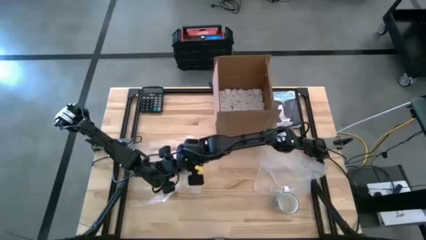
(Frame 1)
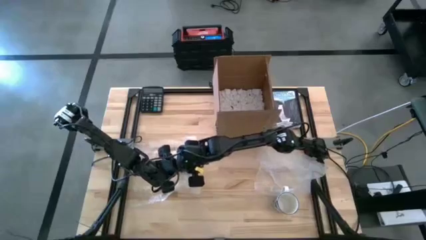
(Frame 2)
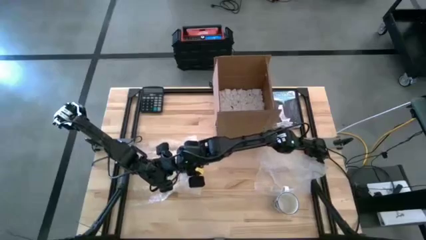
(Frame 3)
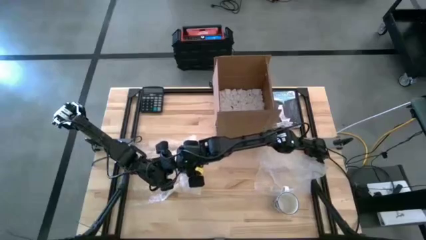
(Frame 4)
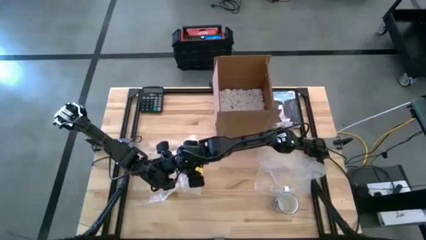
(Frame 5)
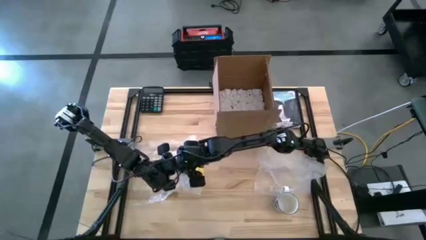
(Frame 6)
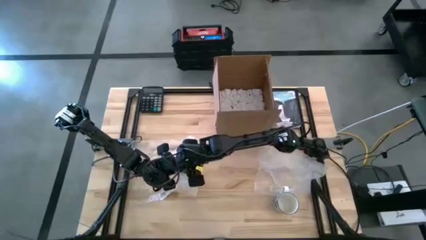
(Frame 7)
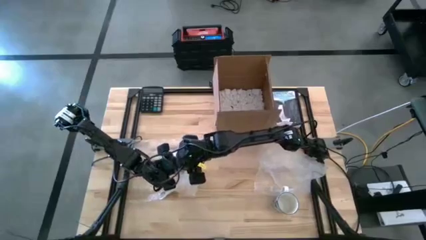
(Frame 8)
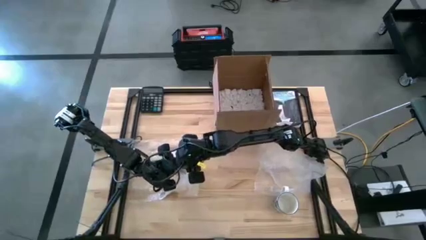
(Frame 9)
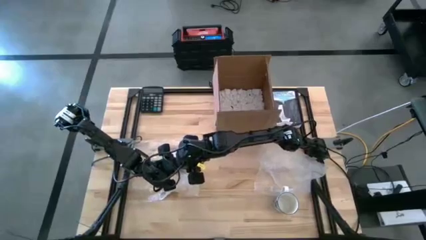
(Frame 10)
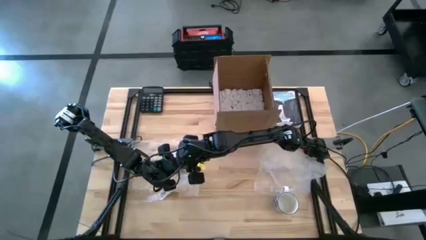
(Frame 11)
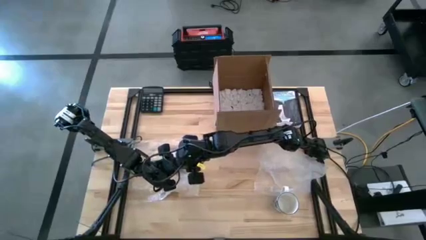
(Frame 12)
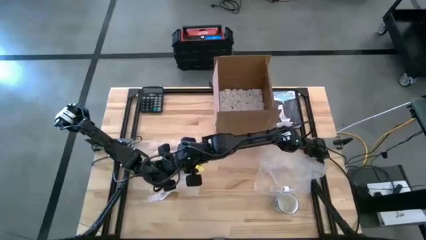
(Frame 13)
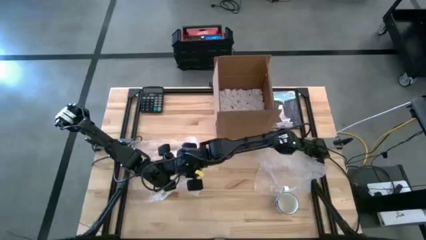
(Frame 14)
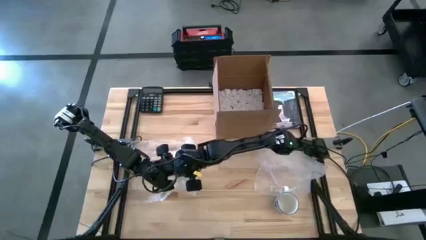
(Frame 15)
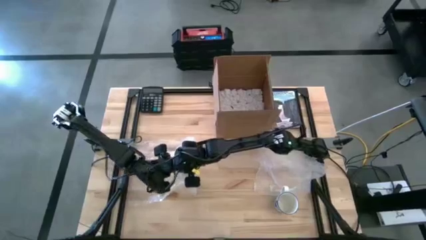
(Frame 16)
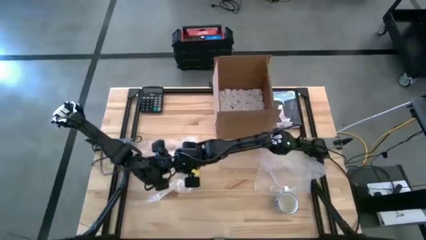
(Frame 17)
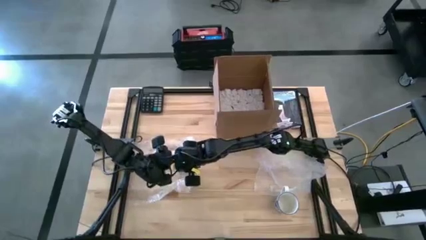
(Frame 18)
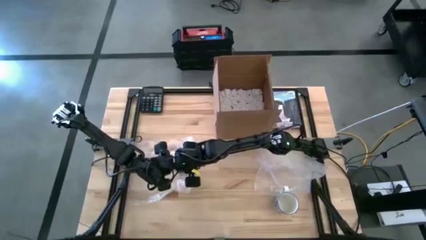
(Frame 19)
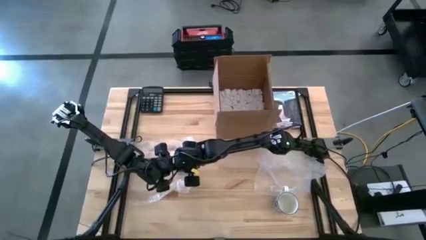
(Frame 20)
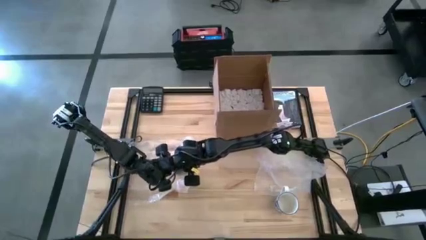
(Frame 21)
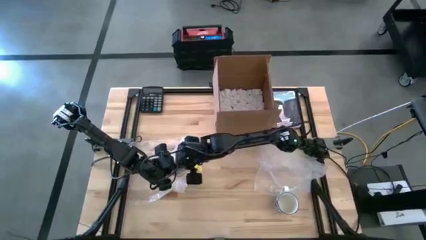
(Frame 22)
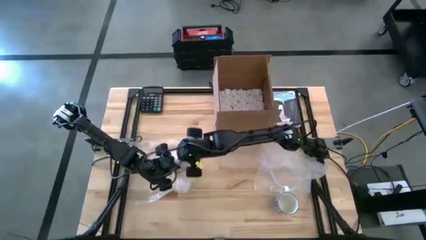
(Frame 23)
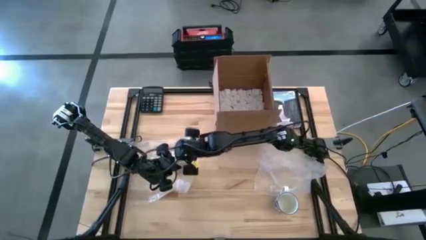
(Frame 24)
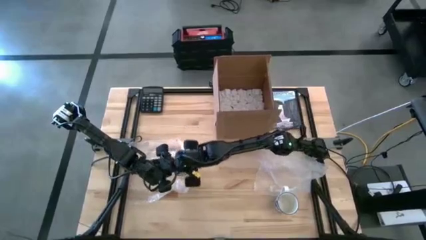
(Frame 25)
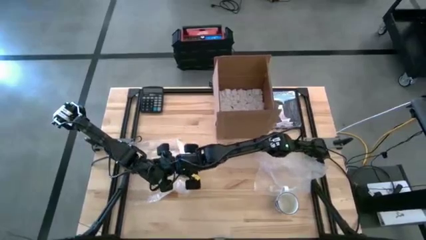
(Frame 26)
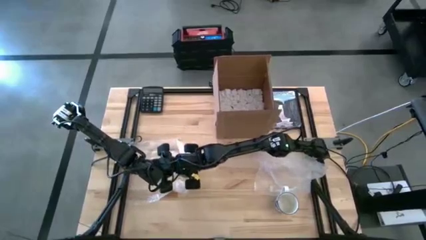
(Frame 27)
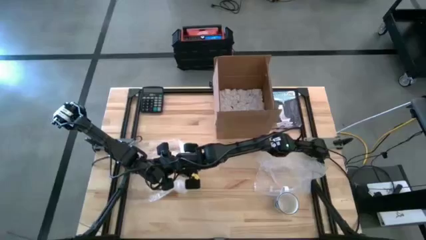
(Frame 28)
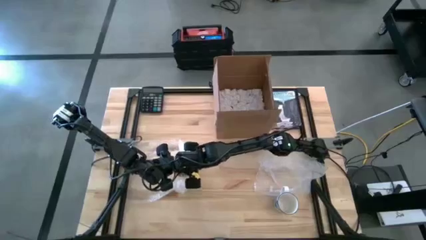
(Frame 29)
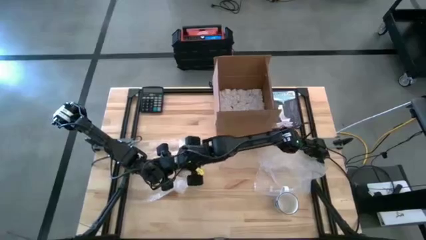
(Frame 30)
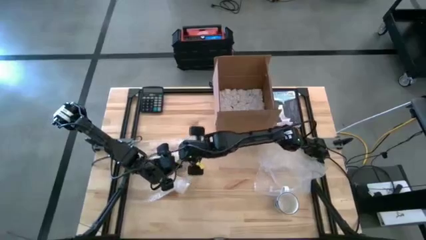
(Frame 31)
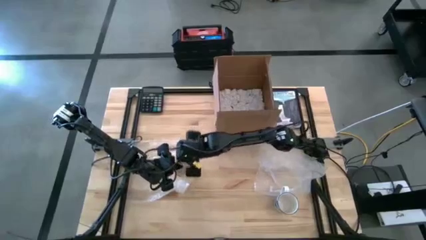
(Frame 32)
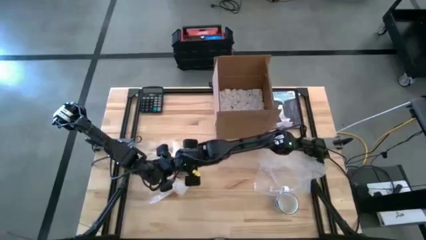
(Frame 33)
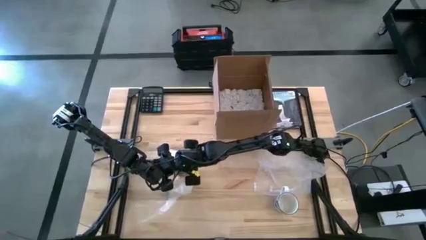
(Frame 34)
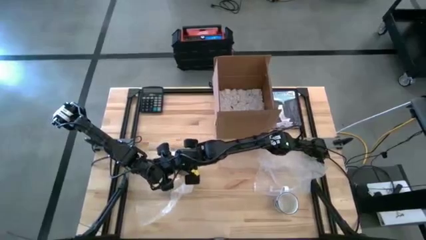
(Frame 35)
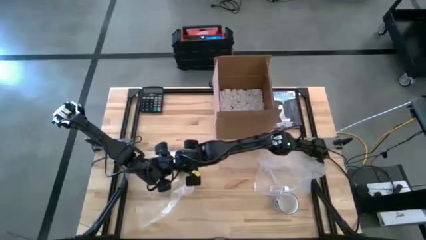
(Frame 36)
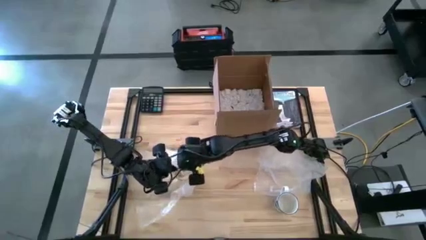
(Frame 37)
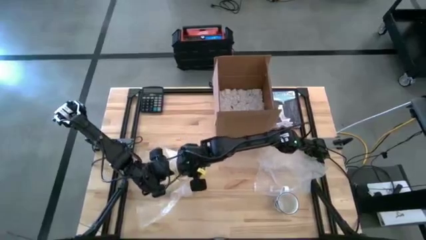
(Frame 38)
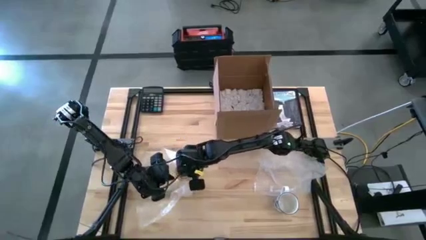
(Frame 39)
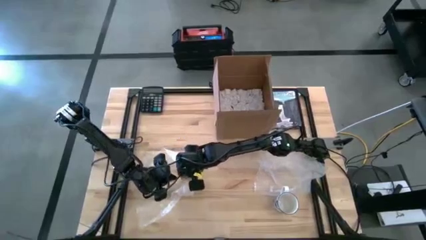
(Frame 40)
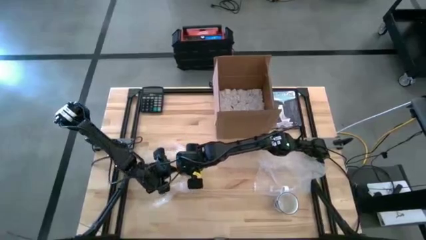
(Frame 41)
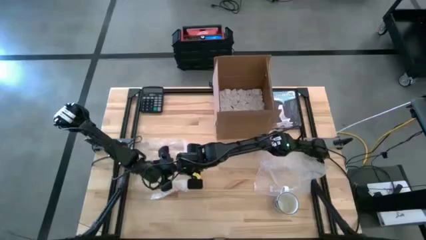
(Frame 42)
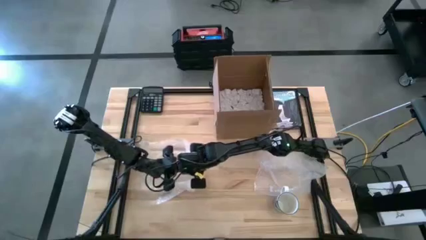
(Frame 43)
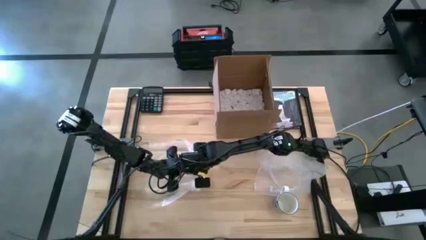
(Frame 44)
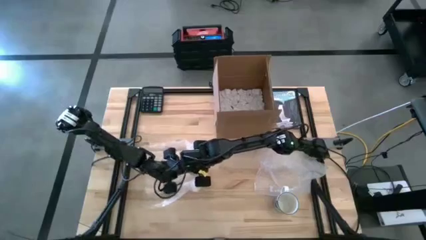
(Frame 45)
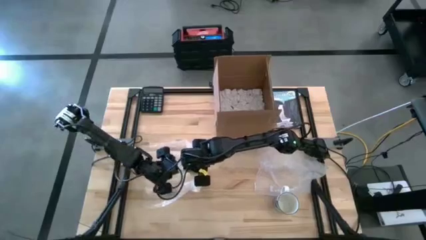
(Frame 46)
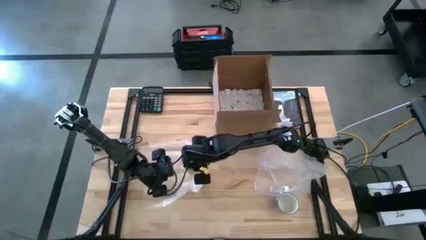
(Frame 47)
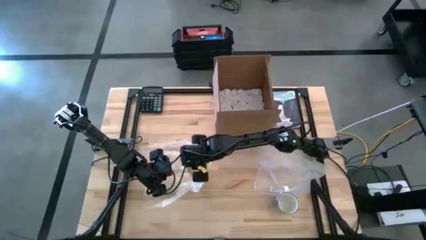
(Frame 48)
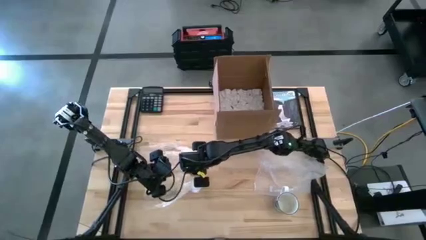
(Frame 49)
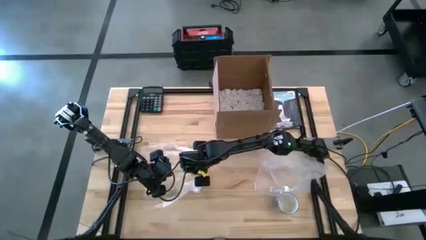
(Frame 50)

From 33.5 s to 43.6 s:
Task: wrap mug
Wrap the yellow mug with the left transparent bubble wrap

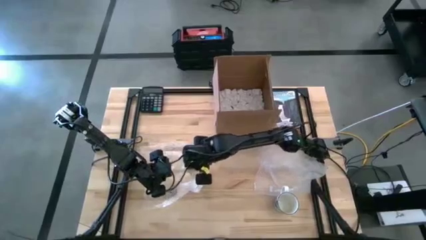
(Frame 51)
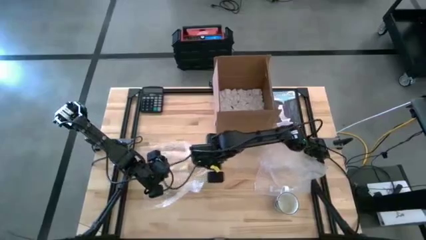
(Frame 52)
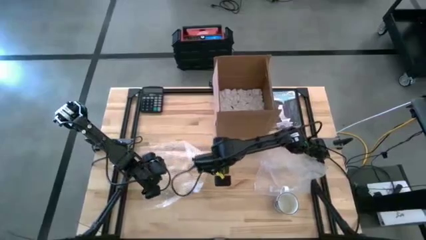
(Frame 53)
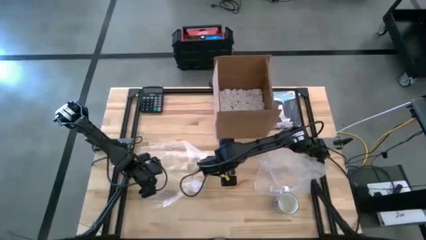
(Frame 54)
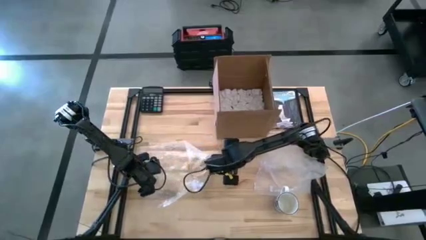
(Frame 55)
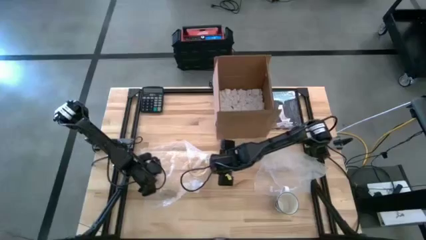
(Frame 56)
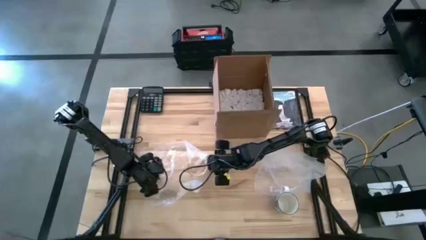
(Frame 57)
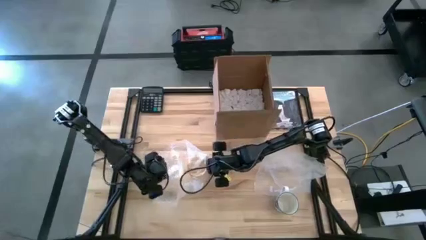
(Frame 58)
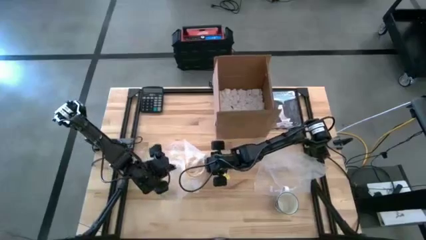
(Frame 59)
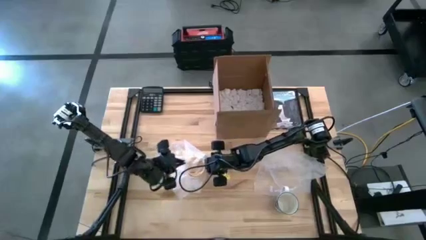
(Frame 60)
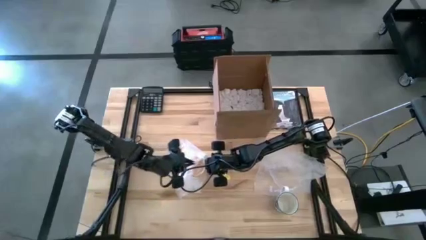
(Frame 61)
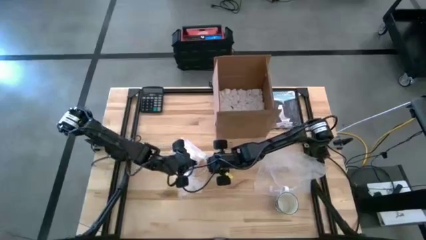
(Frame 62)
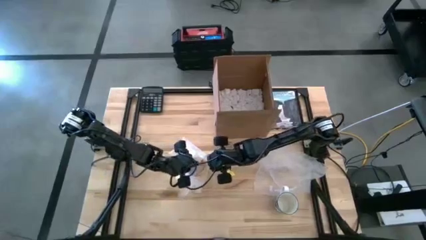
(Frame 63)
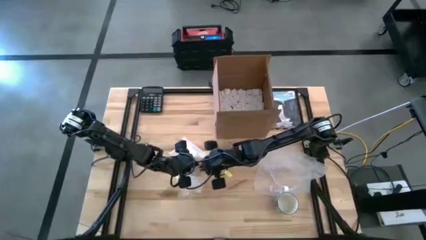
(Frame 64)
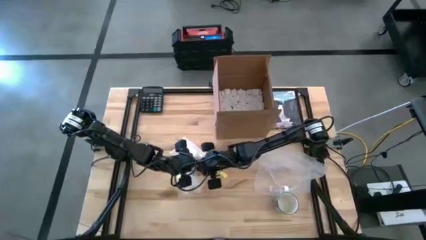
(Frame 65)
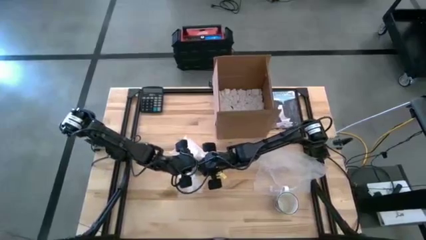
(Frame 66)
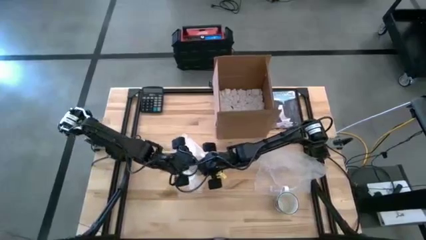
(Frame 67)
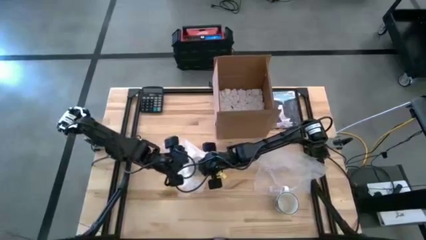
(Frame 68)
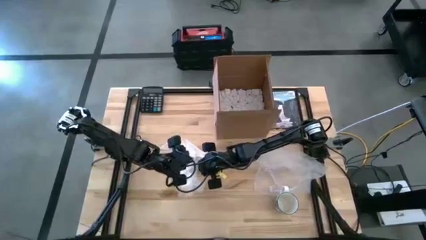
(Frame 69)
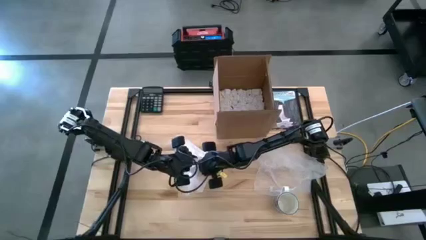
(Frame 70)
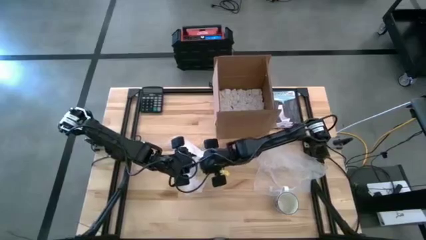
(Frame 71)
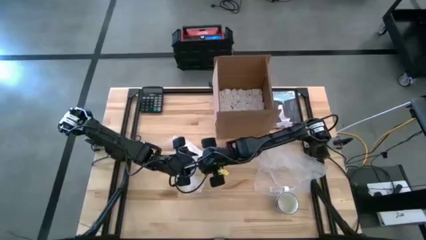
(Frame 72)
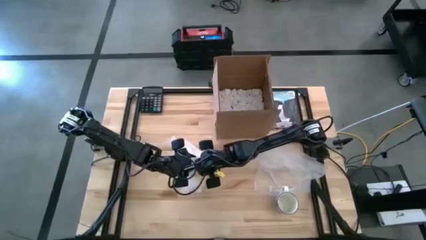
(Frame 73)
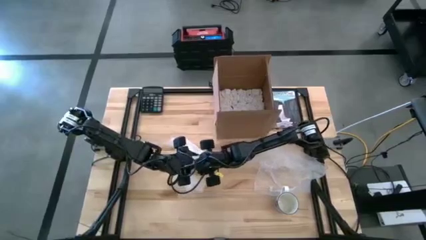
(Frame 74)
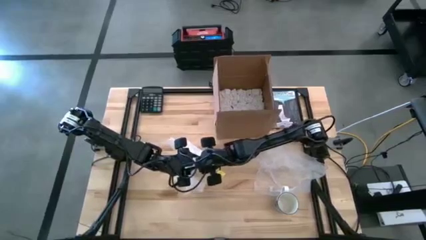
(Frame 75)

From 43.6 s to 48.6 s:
Wrap the yellow mug with the left transparent bubble wrap
